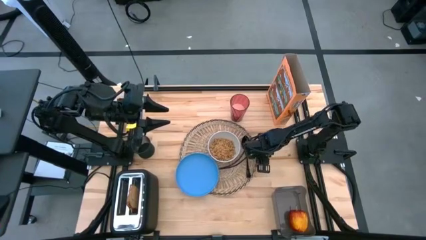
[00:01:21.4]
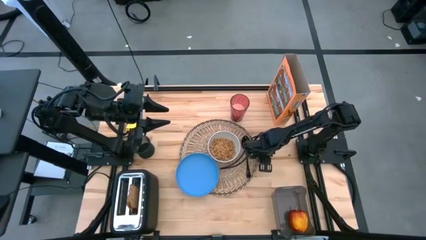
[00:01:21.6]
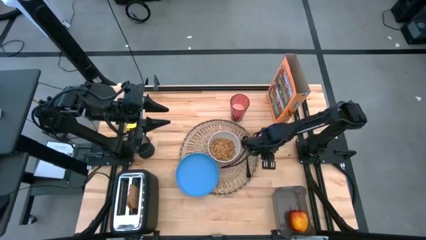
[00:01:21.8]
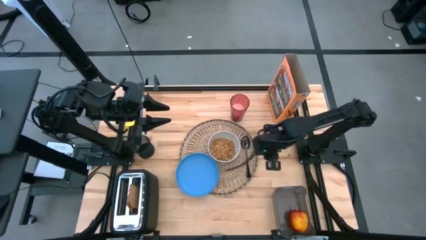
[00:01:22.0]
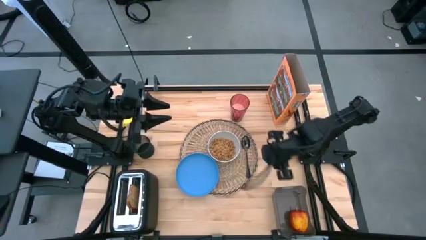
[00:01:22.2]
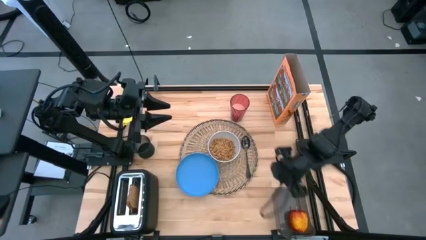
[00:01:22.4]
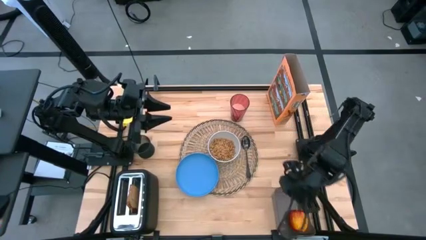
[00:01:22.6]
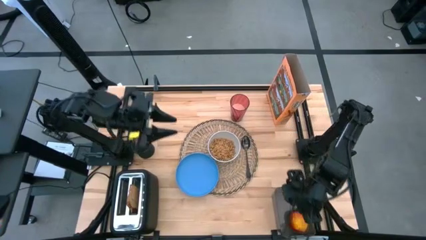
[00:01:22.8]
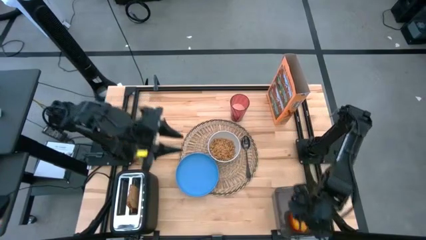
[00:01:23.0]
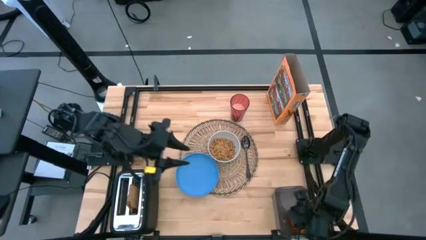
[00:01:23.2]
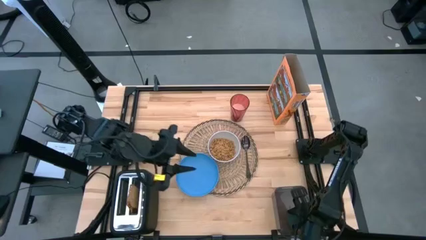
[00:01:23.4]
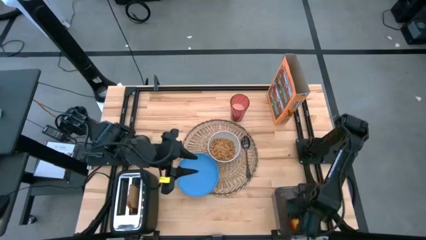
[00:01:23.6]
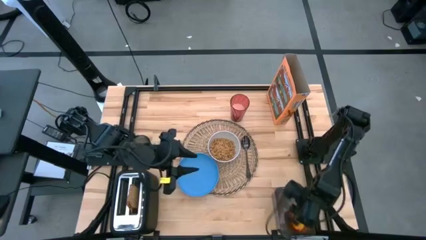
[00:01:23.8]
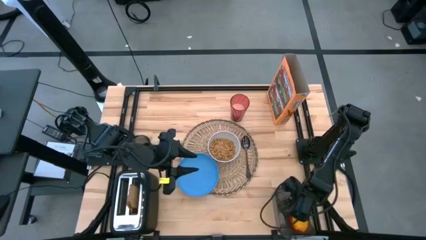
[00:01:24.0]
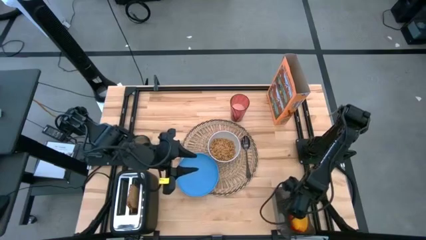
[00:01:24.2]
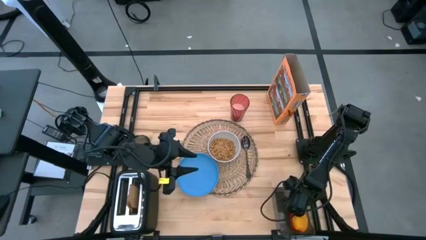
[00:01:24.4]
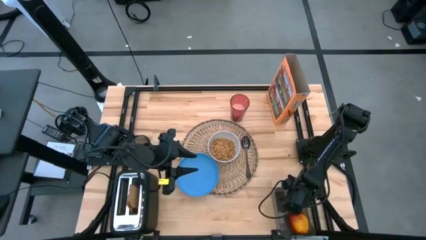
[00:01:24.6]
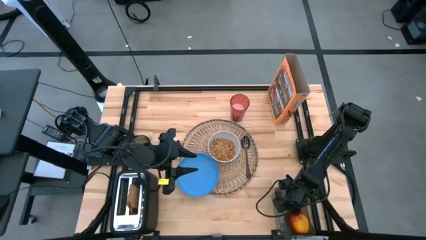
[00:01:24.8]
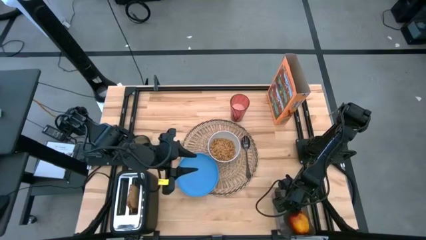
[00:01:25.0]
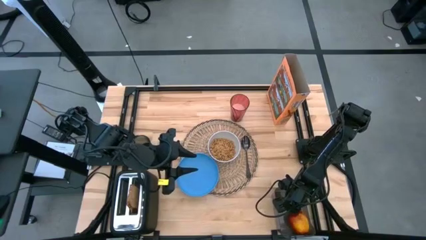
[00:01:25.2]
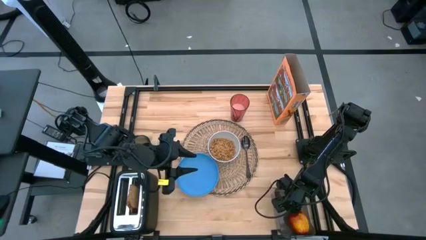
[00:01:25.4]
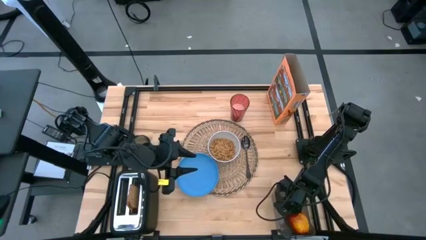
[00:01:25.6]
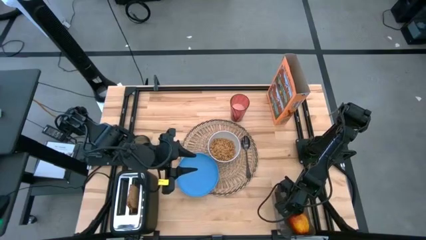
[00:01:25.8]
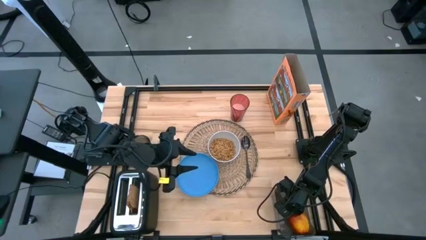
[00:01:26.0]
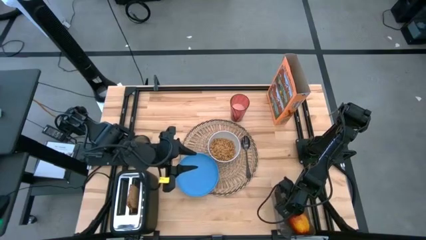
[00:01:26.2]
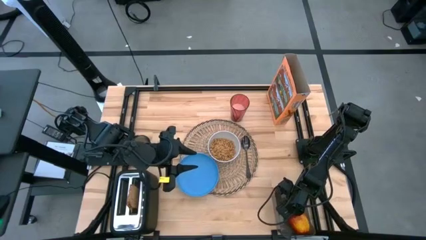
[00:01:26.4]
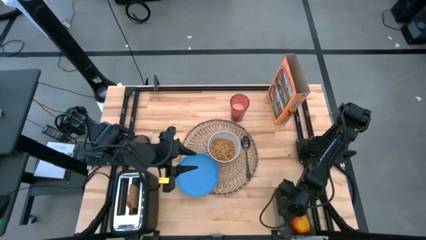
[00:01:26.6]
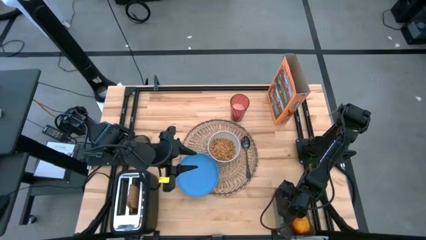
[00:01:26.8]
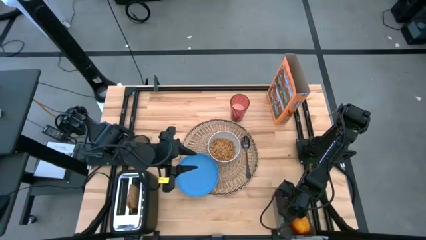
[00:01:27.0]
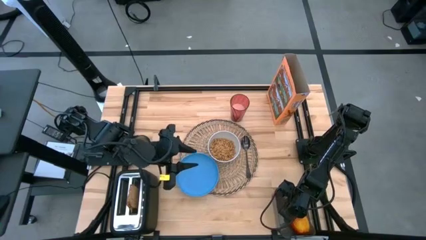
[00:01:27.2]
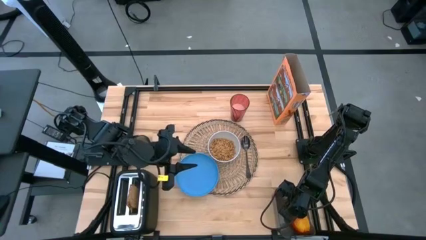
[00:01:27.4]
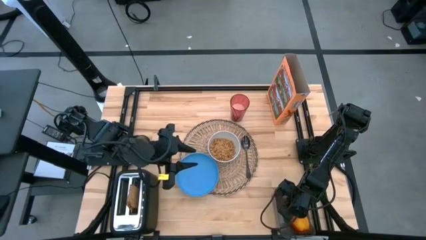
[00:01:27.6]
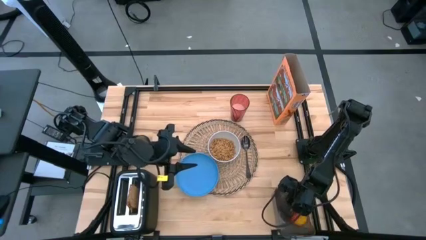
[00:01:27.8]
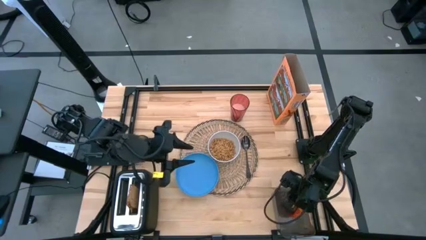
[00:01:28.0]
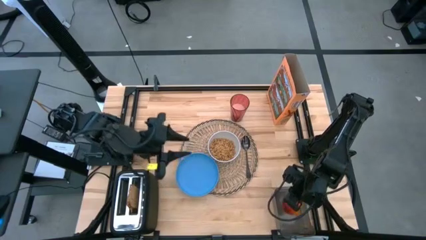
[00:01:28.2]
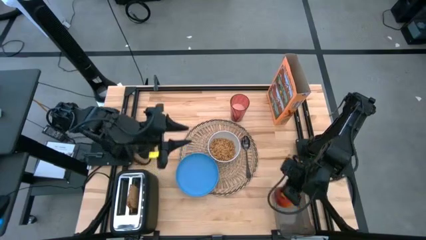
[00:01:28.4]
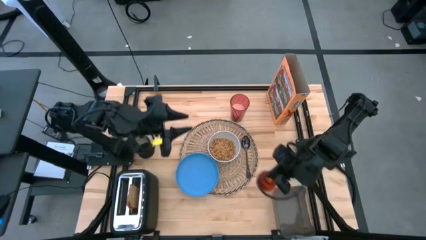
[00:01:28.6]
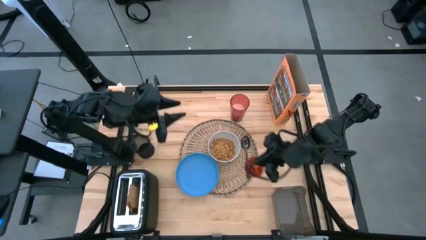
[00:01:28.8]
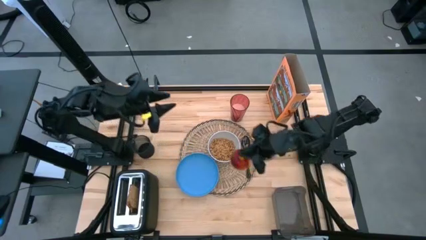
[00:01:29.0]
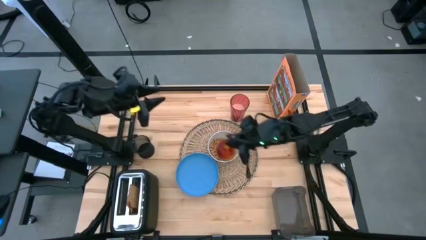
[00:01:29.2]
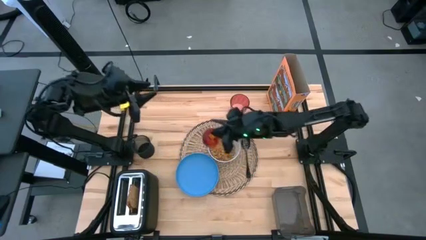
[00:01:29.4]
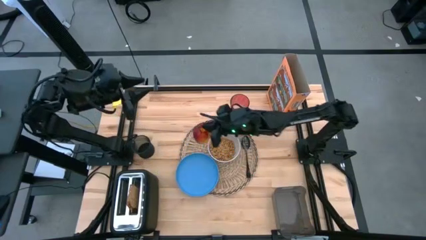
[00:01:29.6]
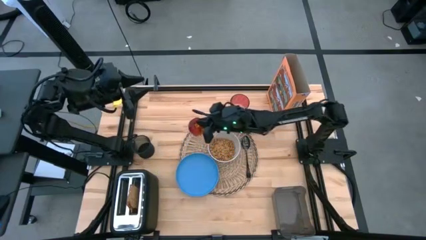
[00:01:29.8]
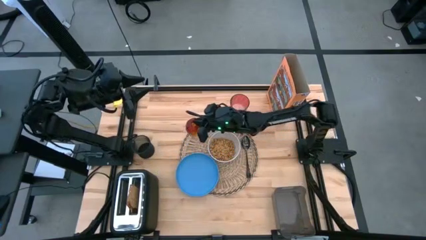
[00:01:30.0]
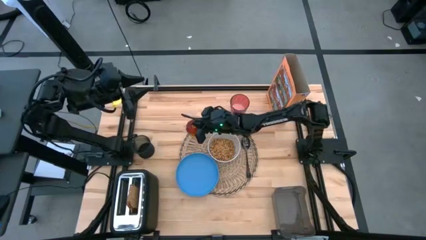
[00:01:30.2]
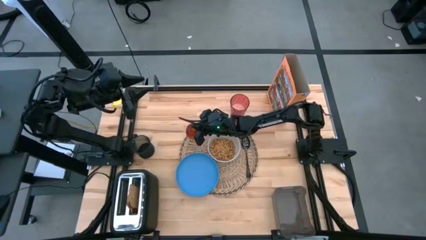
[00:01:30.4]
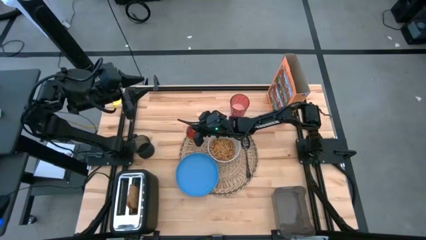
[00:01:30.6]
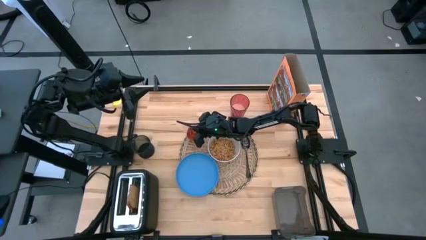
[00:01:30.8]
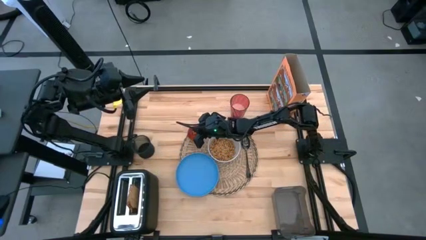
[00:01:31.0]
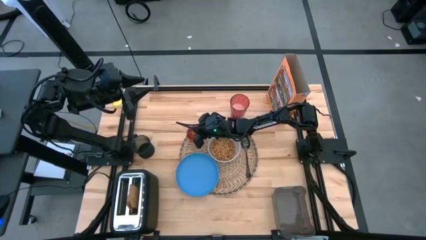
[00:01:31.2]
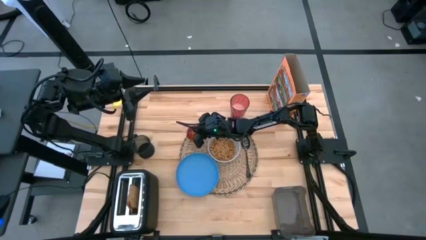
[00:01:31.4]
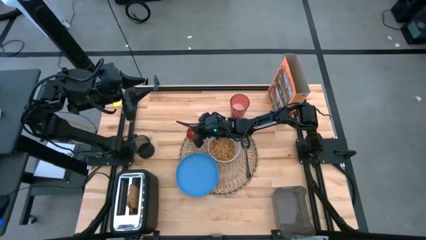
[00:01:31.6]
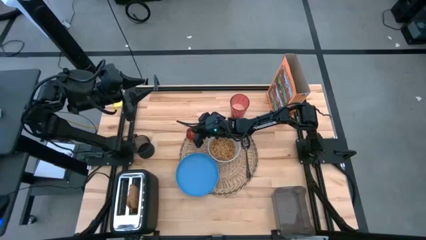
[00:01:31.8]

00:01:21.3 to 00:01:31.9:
Task: Arrange a breakfast setting
Put the apple on the tray above the blue plate

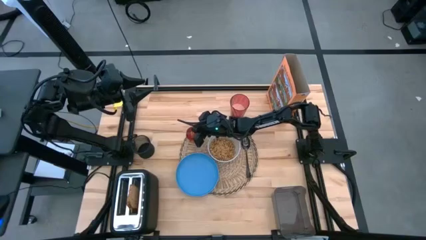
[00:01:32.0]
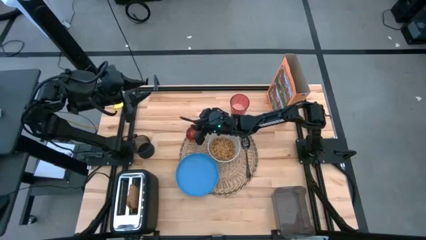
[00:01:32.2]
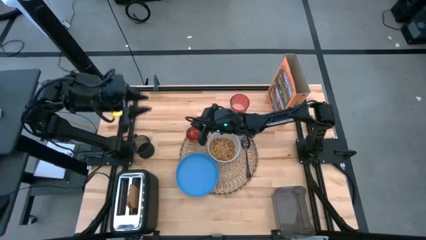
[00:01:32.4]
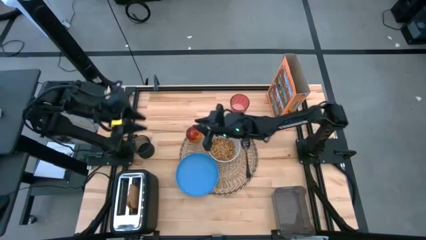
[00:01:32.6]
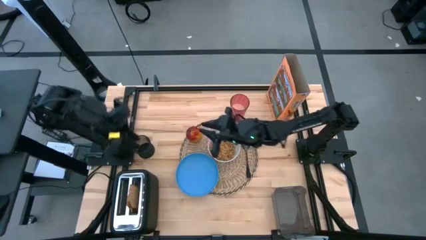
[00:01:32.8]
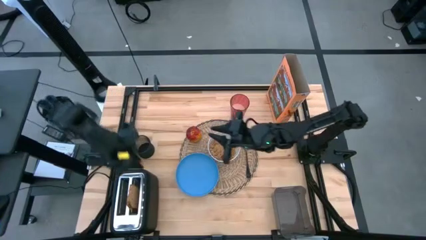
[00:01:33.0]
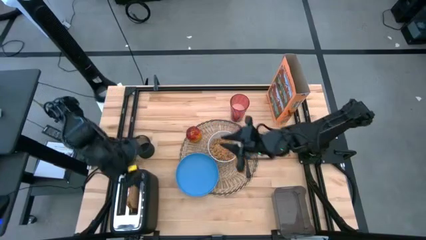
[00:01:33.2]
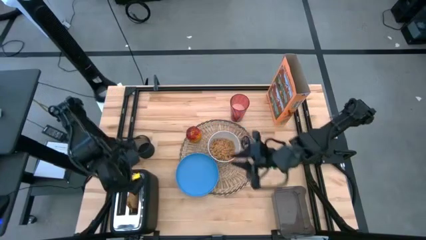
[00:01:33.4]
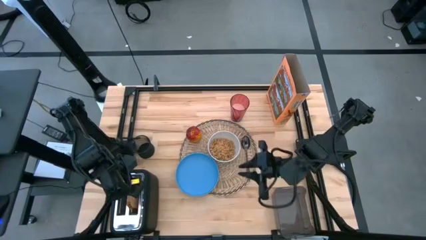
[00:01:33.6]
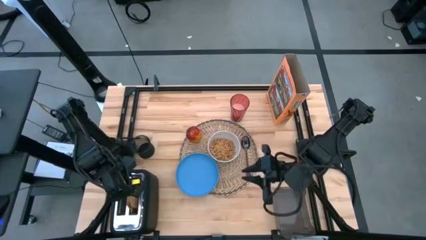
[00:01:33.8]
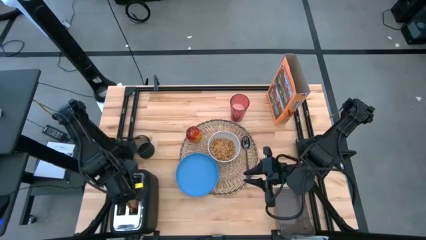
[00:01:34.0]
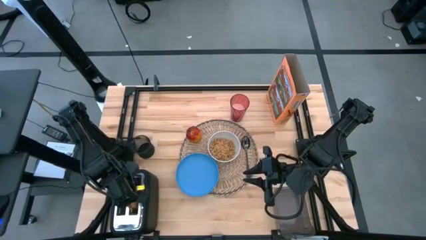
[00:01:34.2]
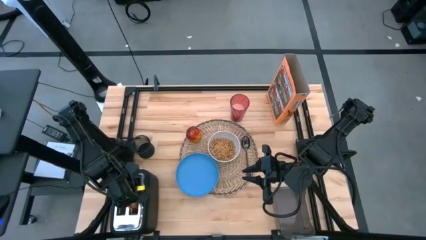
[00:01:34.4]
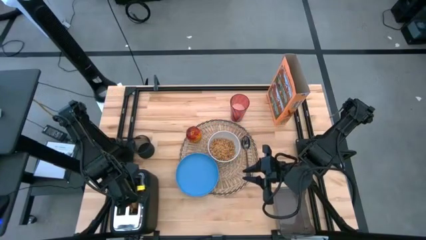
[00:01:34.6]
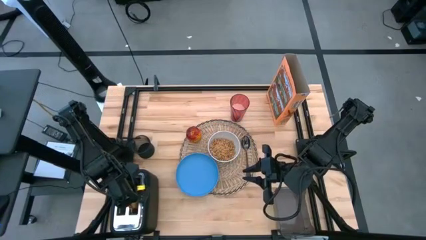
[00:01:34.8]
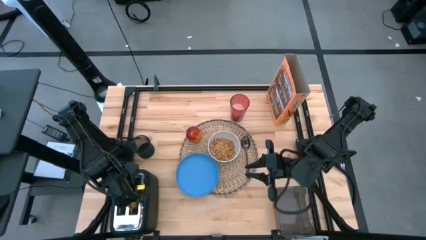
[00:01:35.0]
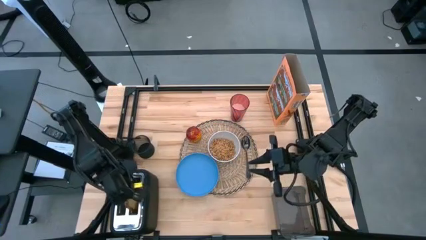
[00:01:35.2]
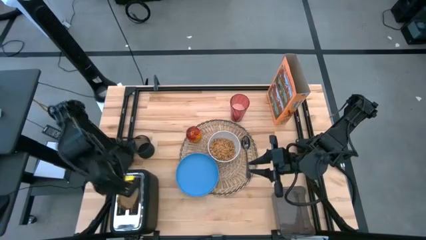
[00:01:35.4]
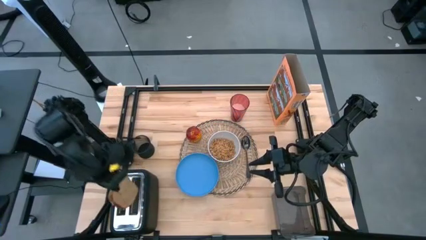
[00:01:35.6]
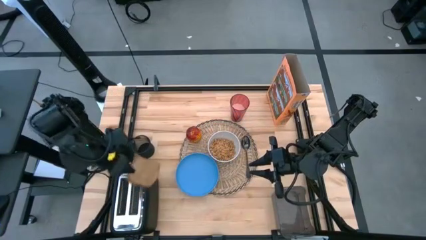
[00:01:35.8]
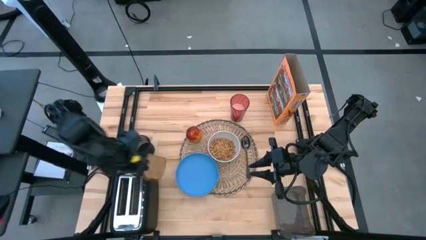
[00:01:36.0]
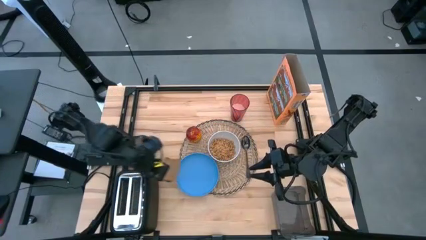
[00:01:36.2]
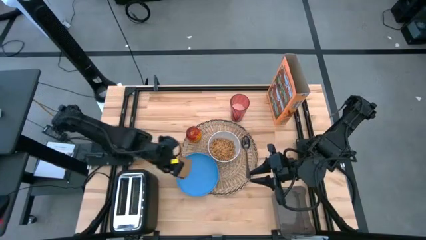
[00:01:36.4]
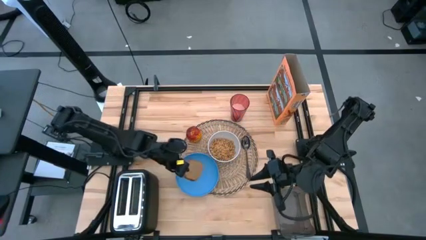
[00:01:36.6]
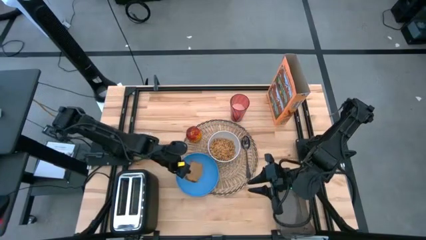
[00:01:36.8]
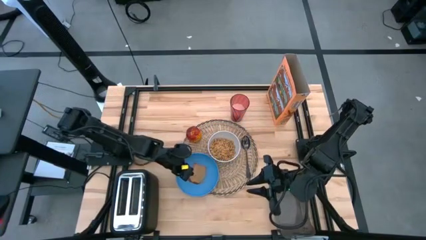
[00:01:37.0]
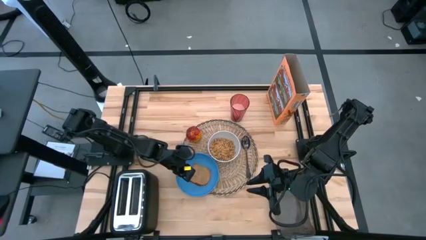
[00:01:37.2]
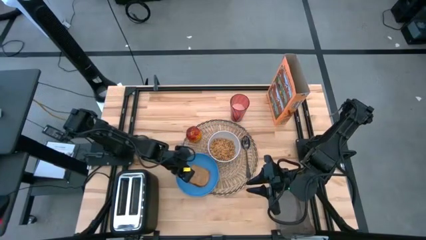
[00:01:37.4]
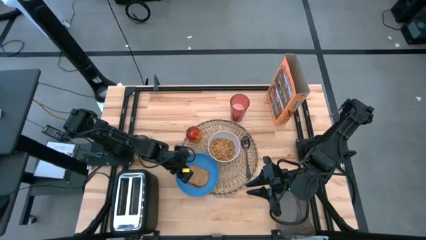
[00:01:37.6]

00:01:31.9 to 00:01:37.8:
Put the toasted bread on the blue plate
